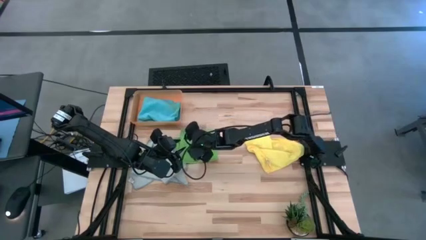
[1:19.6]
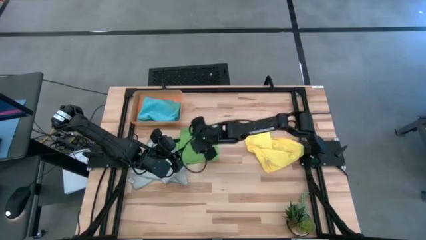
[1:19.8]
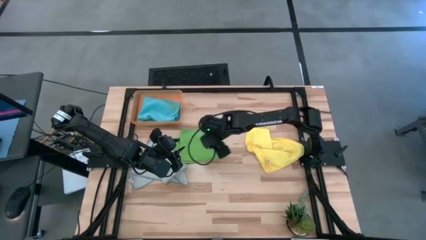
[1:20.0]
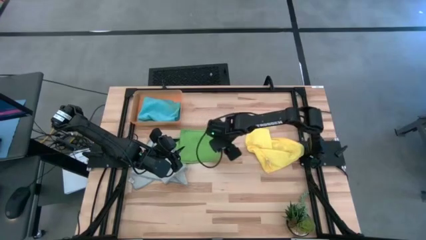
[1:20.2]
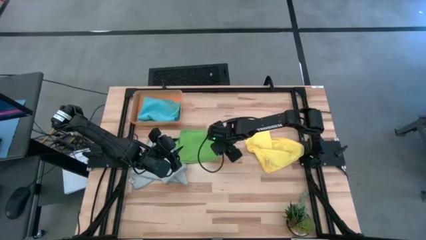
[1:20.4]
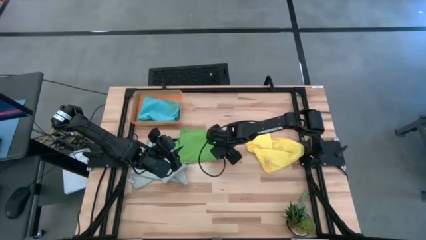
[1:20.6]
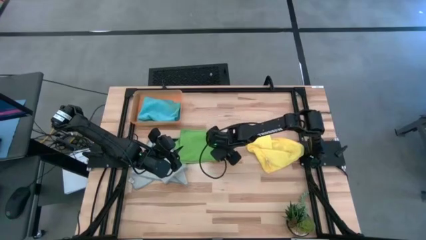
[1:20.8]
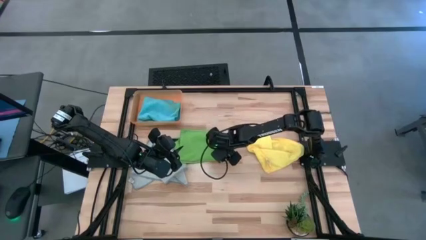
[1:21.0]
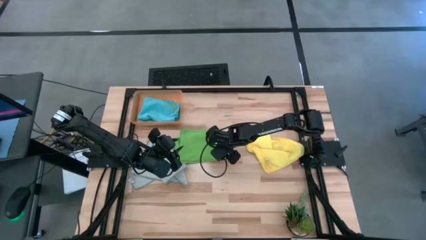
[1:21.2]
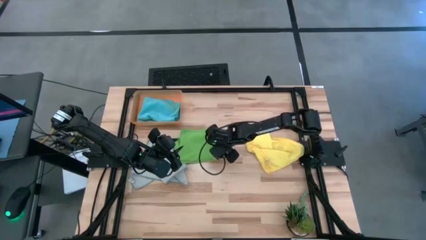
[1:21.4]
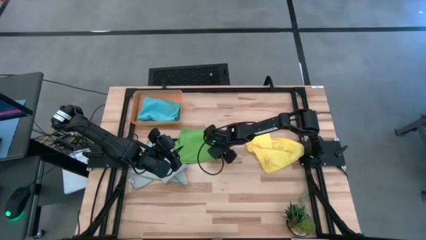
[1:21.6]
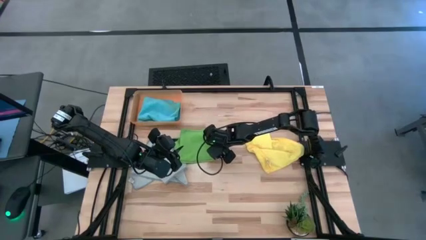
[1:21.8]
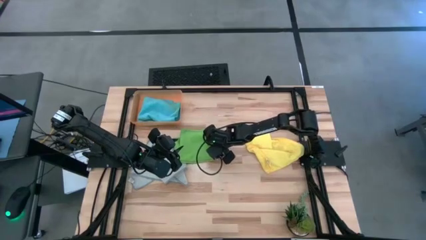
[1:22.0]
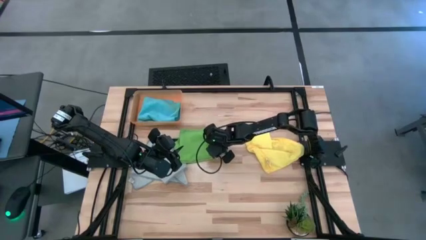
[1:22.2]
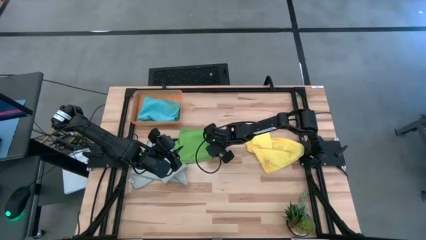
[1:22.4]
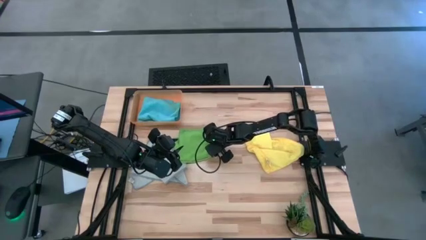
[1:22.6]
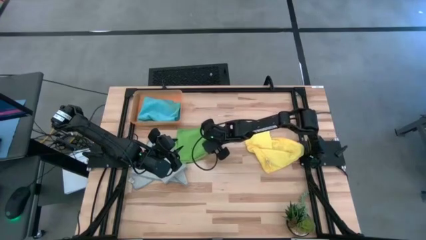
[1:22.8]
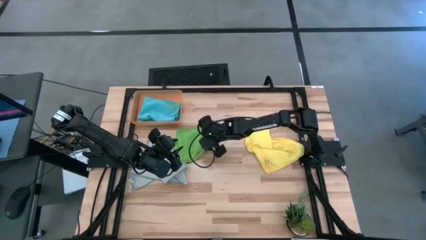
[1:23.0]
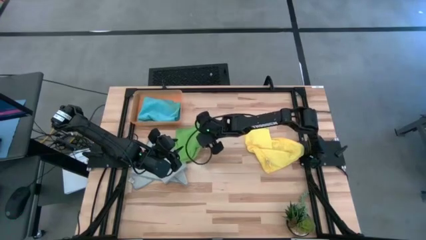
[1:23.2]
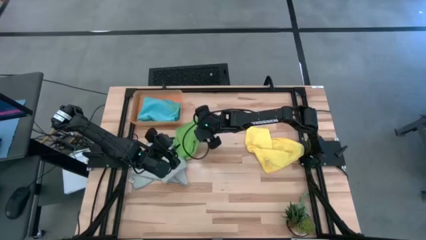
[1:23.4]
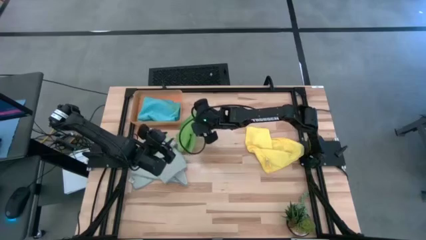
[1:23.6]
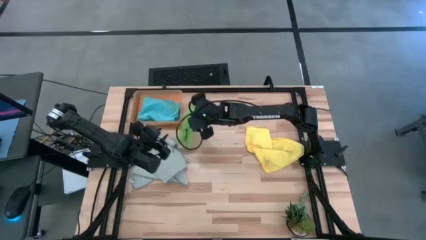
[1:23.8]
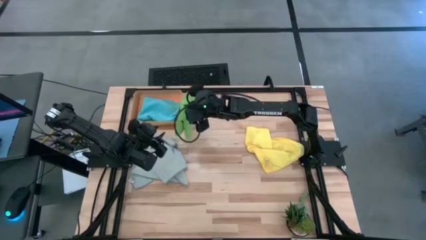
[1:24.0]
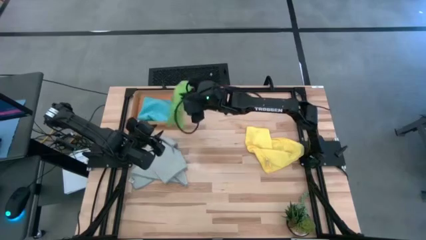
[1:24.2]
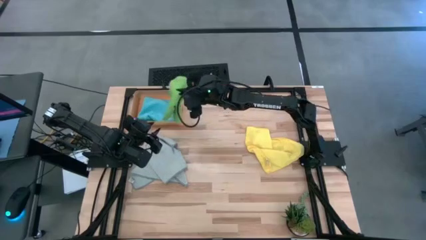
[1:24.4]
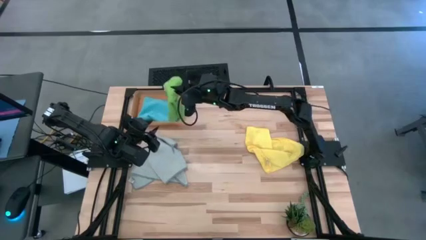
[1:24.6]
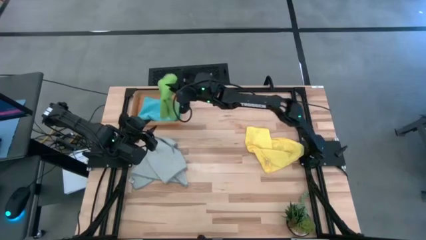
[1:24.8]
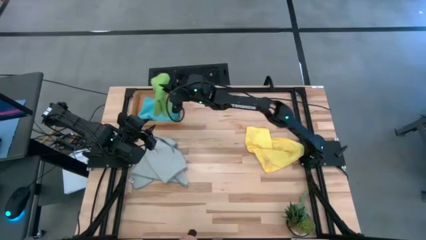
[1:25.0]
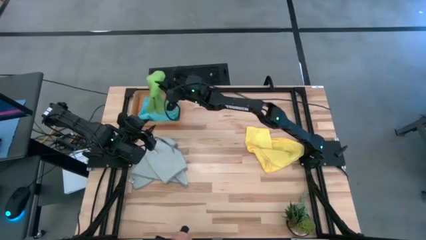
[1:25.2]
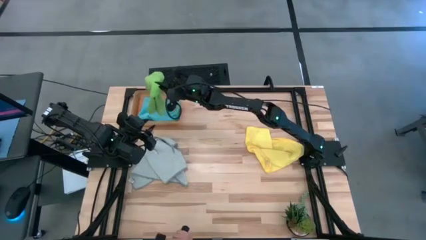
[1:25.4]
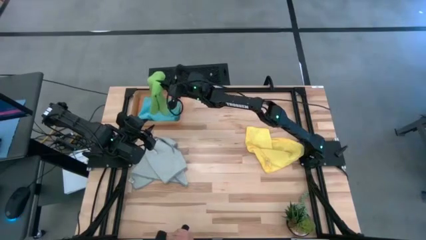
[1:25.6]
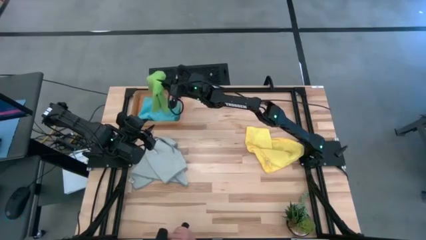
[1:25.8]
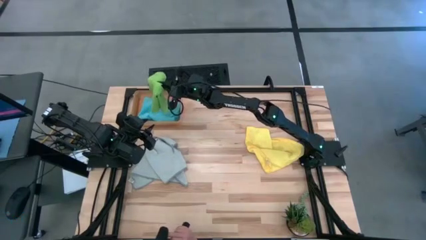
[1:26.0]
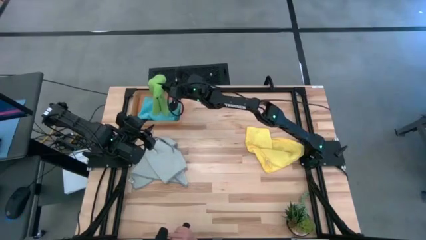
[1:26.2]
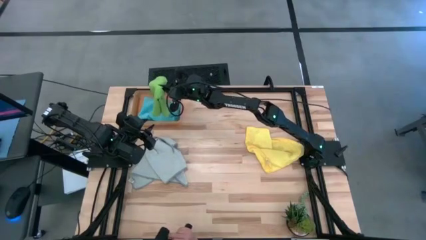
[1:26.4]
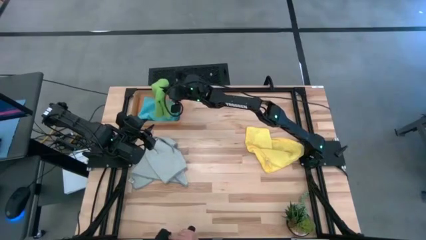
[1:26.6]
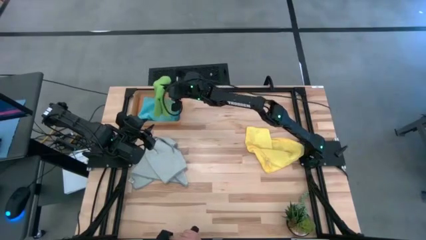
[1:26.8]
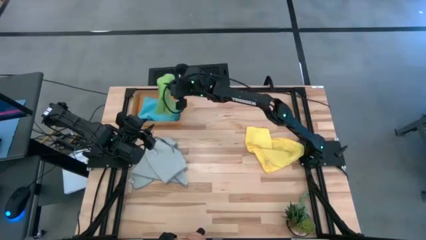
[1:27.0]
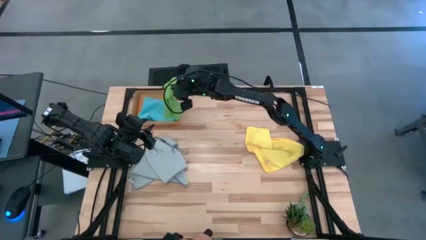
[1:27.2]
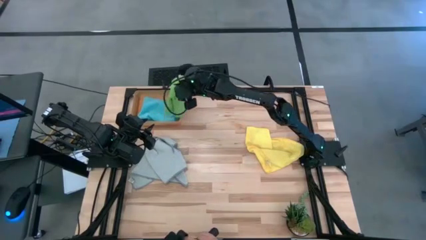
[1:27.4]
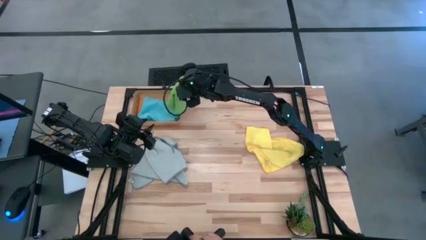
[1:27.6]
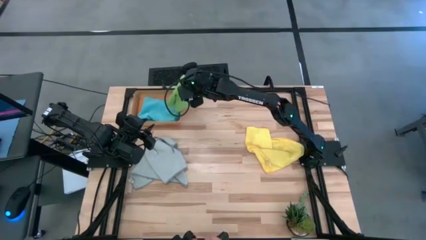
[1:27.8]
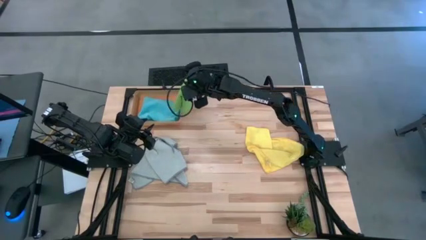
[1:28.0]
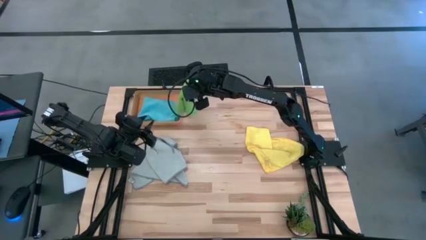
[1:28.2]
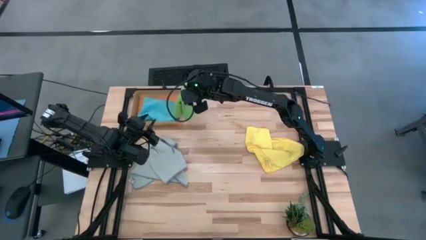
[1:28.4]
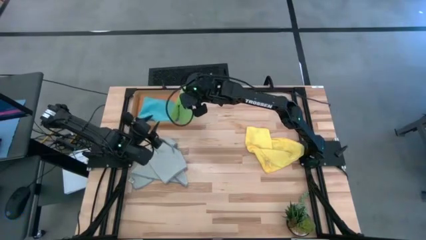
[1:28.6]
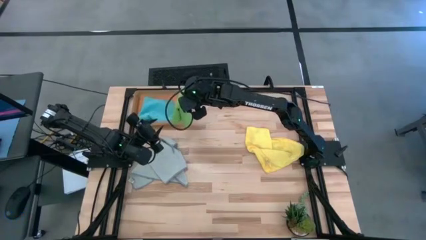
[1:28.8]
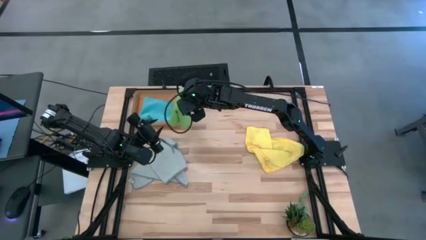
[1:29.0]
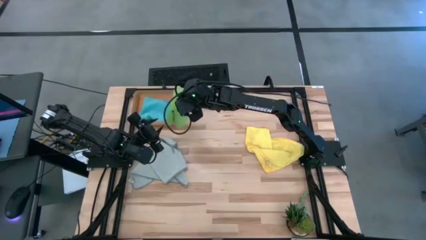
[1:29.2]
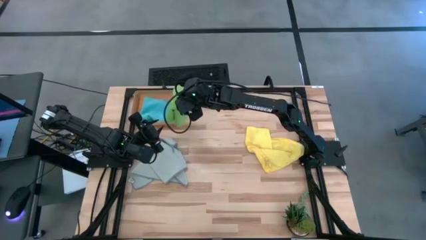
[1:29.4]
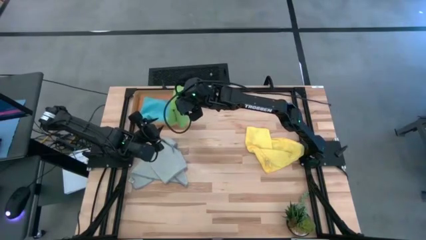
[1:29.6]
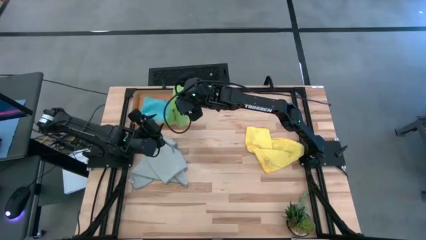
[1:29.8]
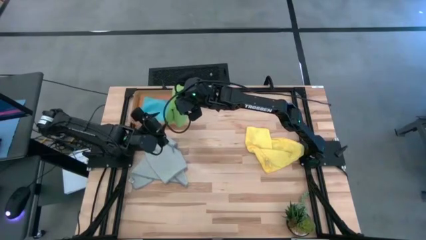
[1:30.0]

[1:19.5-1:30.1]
Task: Fold microfiber towels
Put the green microfiber cloth into the orange bin

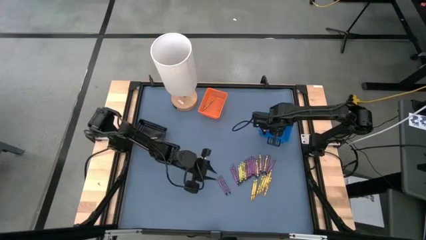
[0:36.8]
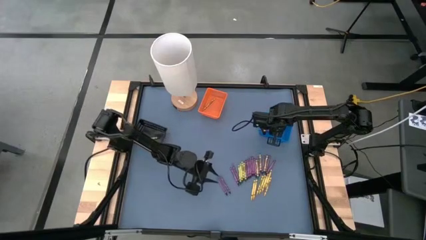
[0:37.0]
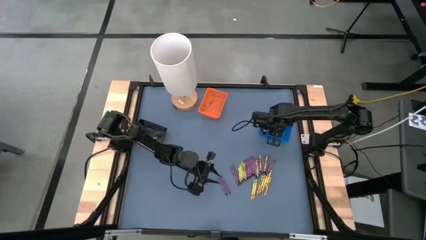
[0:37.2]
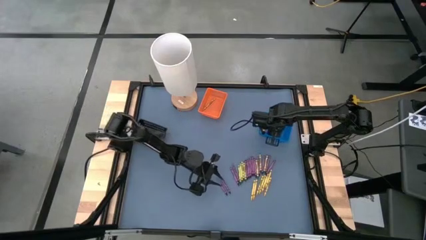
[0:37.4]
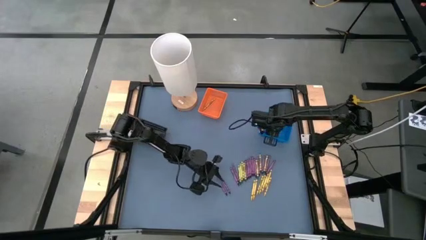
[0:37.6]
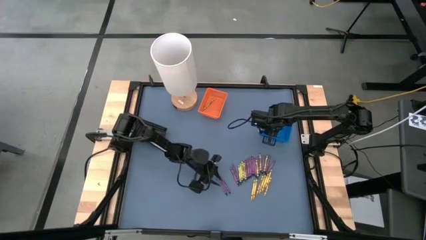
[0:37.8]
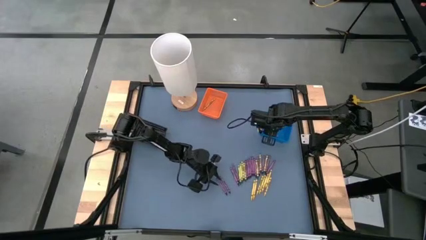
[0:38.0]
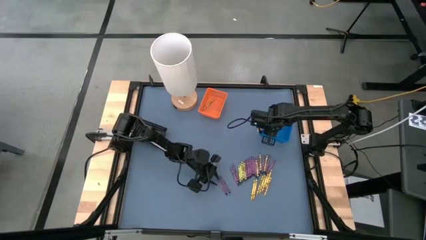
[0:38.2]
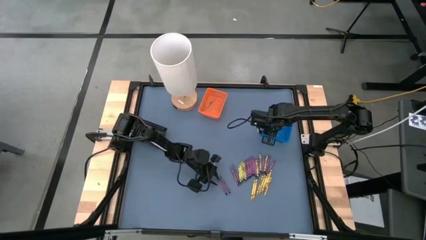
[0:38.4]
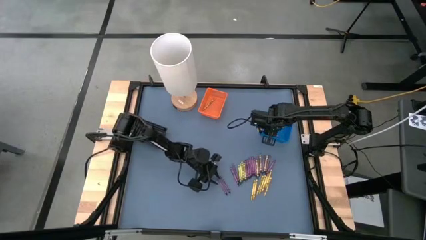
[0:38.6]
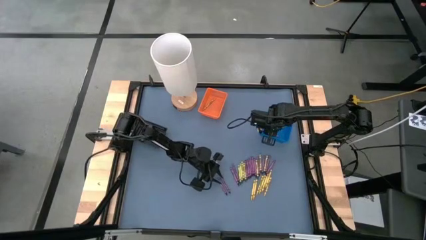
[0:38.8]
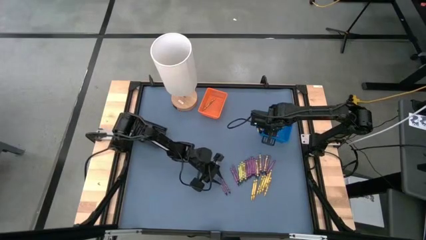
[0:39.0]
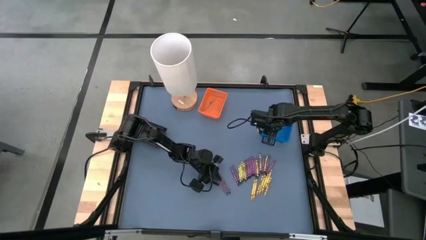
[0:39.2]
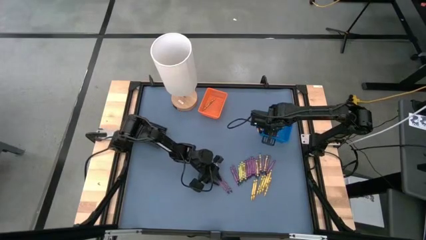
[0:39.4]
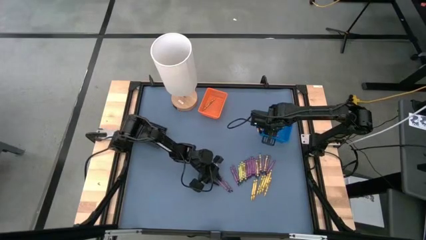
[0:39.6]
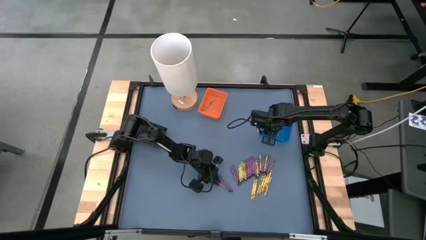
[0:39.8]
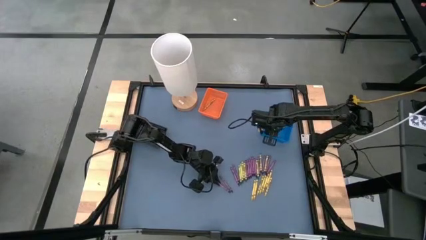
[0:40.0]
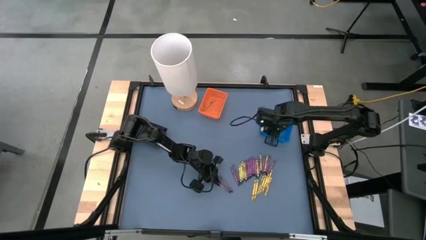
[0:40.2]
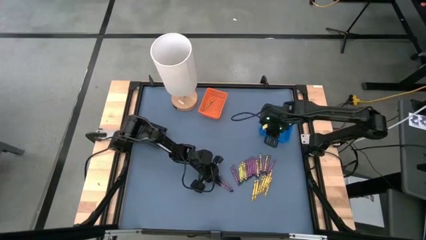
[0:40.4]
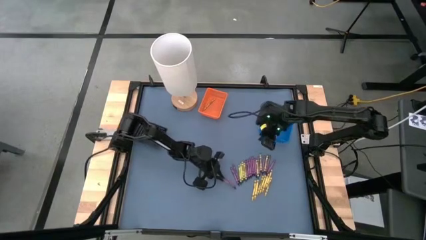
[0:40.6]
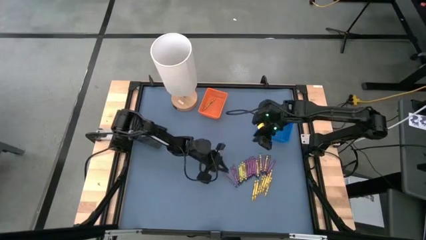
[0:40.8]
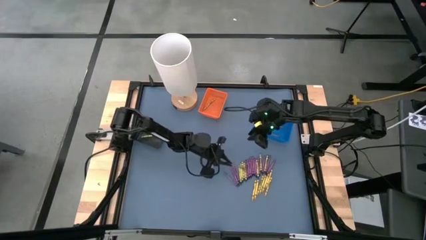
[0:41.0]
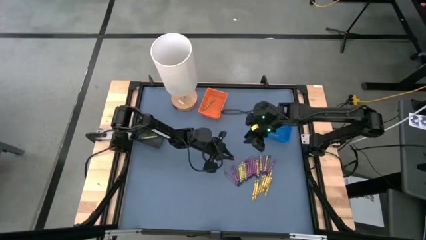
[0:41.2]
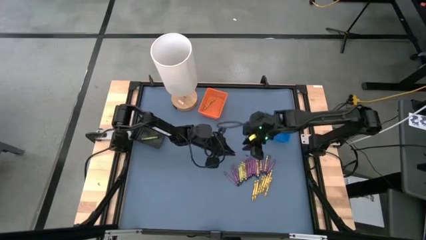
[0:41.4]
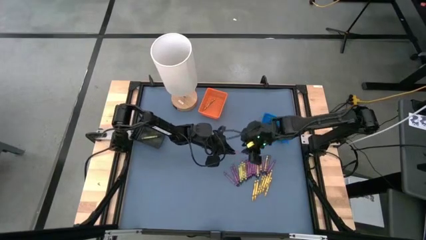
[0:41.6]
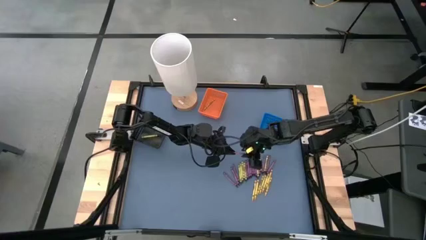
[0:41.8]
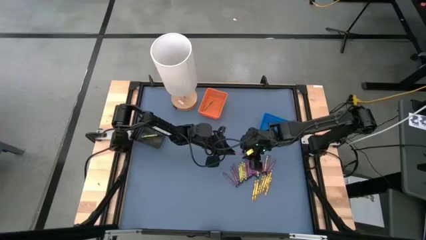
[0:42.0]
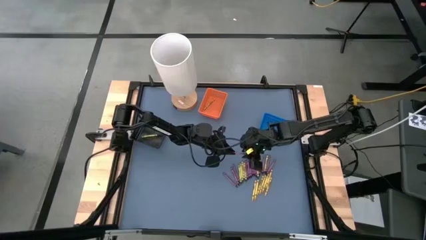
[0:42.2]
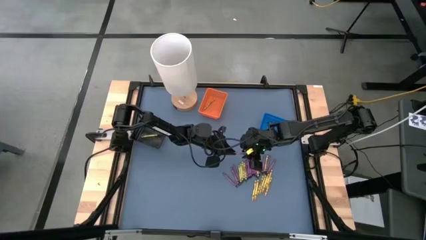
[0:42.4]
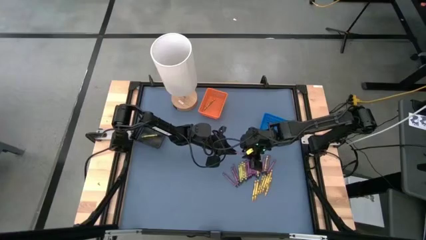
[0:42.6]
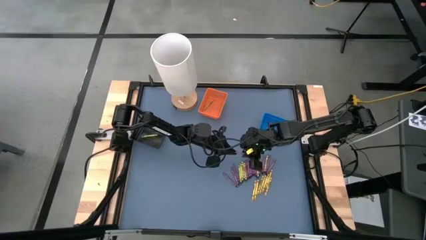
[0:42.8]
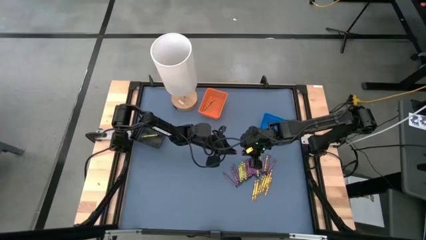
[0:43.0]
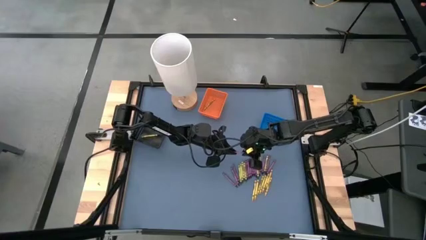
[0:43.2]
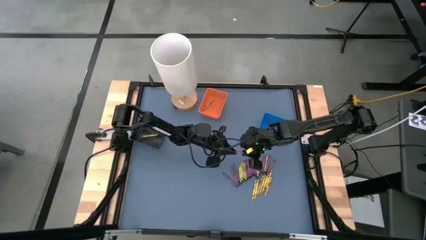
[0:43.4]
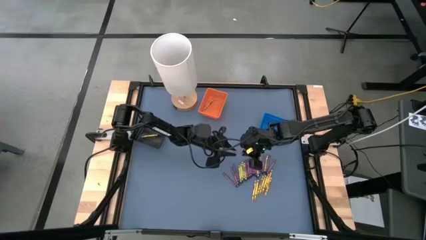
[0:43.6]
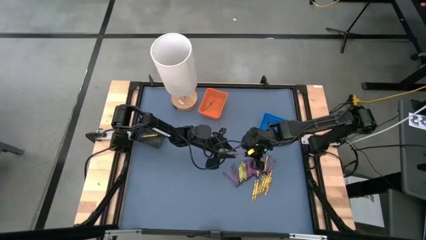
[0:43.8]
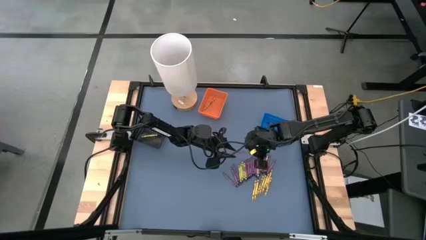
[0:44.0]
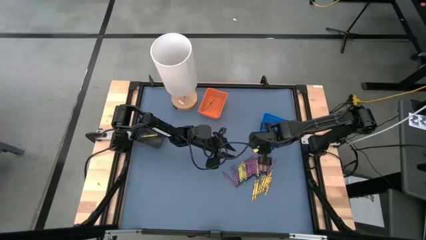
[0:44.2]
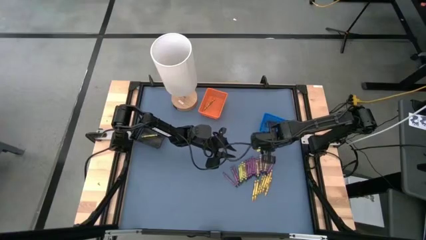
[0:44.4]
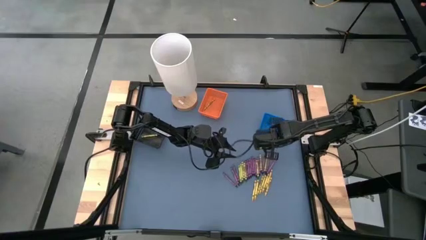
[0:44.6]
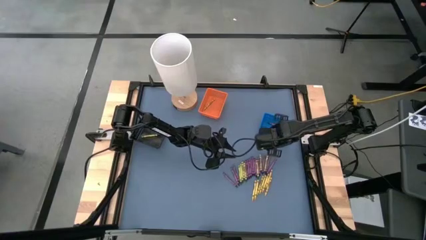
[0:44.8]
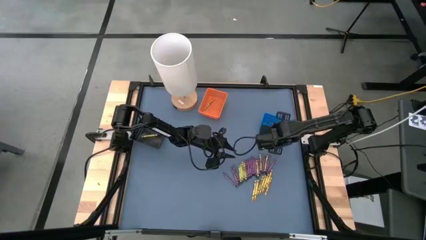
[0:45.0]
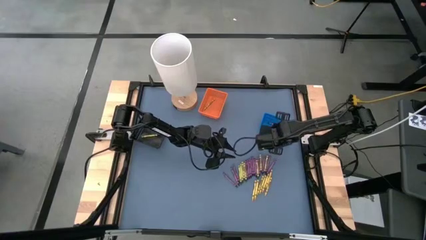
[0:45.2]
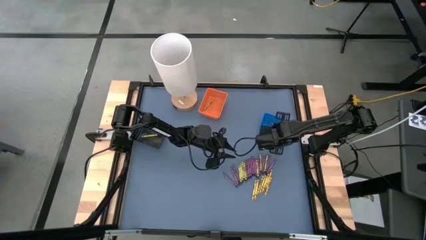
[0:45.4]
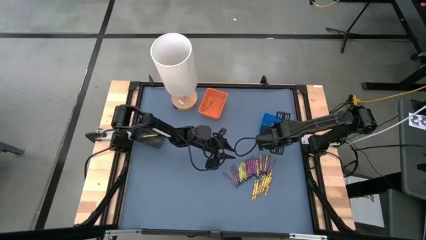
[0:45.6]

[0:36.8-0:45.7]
Task: Sort crayons
Put the violet crayon into the blue basket
